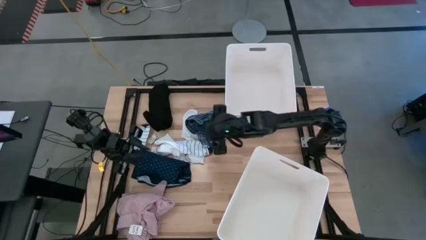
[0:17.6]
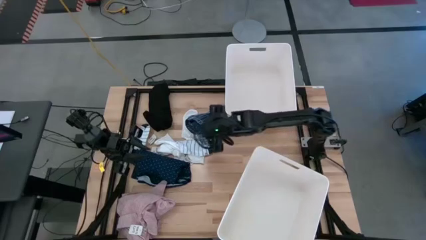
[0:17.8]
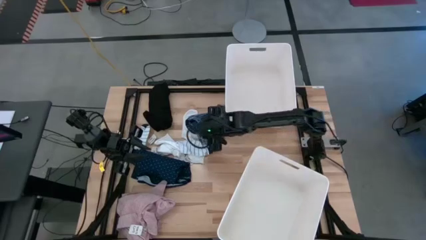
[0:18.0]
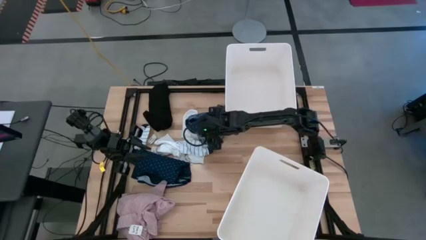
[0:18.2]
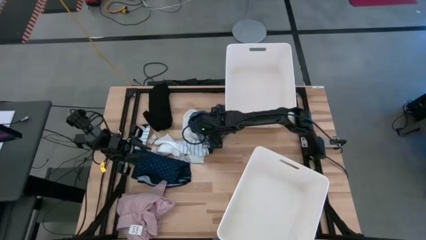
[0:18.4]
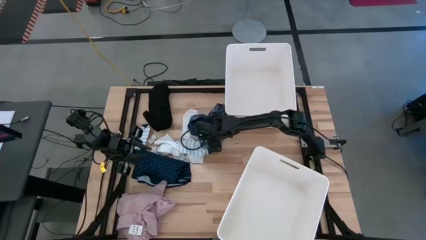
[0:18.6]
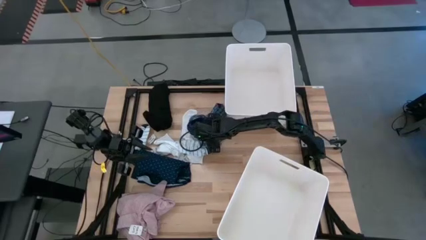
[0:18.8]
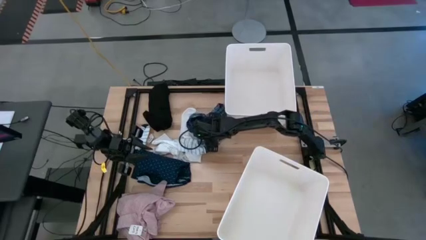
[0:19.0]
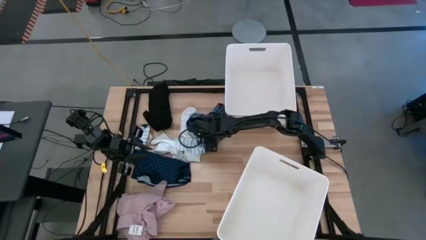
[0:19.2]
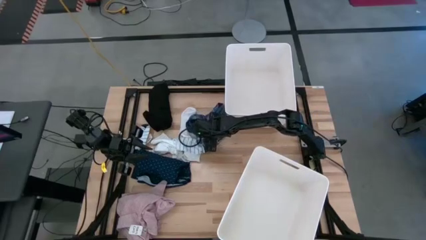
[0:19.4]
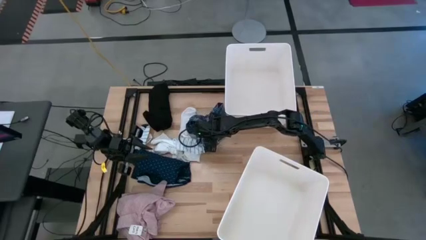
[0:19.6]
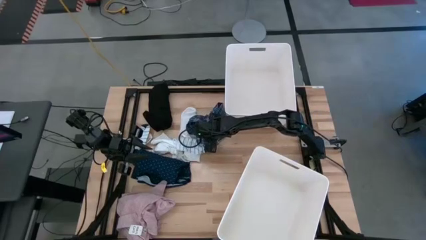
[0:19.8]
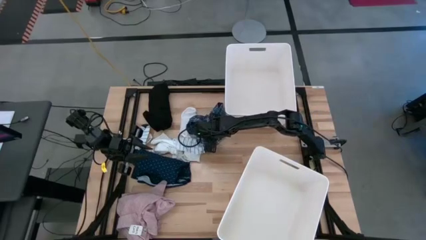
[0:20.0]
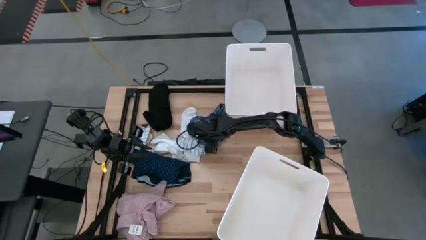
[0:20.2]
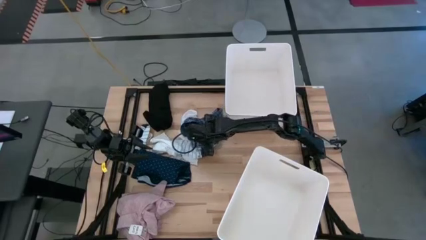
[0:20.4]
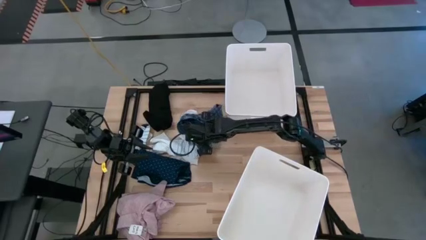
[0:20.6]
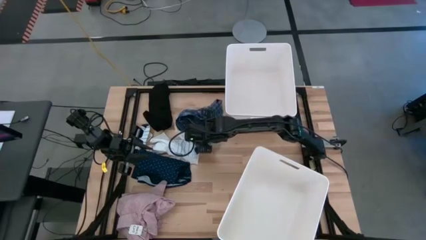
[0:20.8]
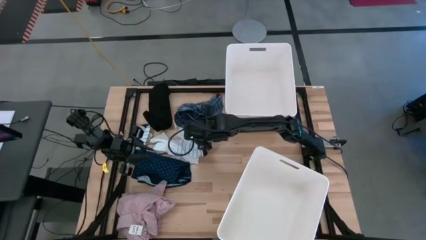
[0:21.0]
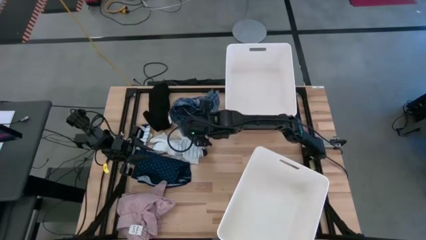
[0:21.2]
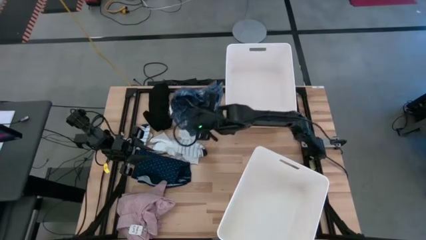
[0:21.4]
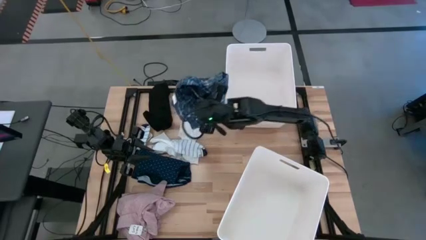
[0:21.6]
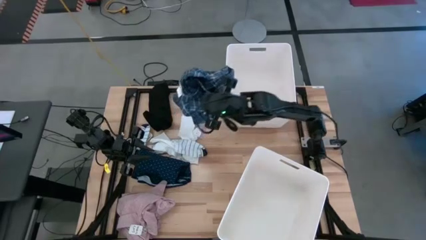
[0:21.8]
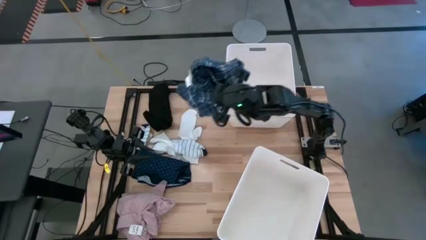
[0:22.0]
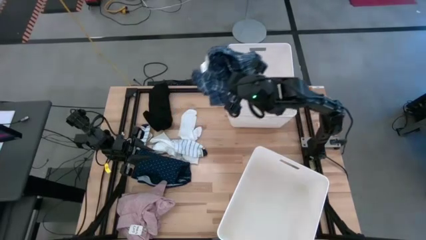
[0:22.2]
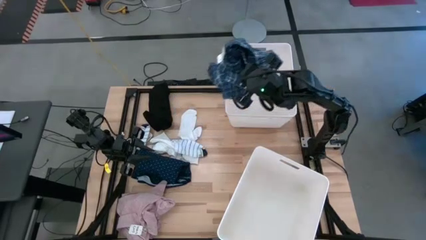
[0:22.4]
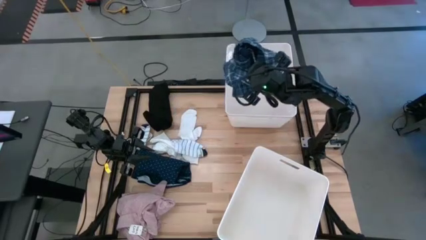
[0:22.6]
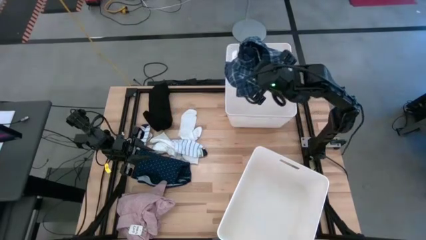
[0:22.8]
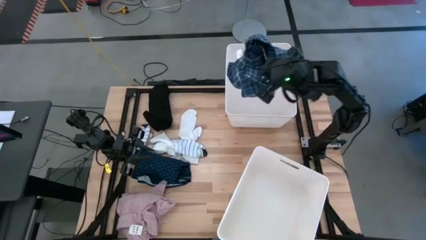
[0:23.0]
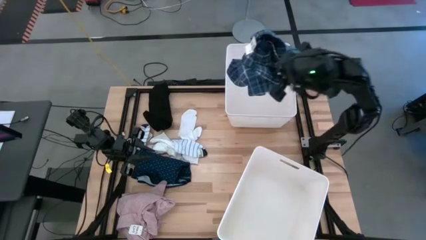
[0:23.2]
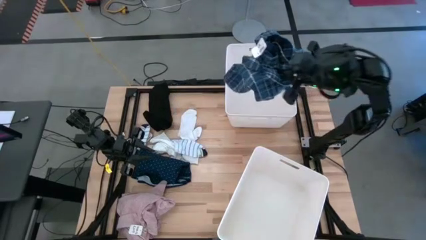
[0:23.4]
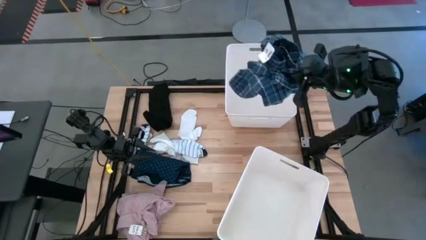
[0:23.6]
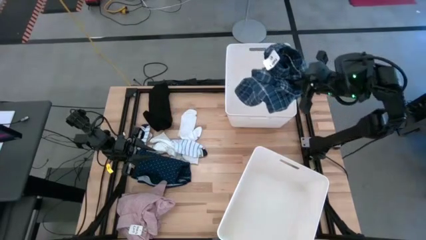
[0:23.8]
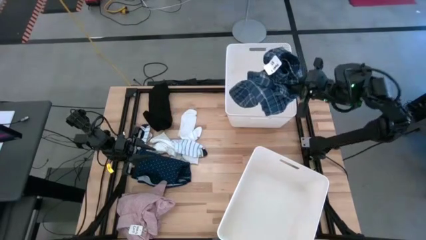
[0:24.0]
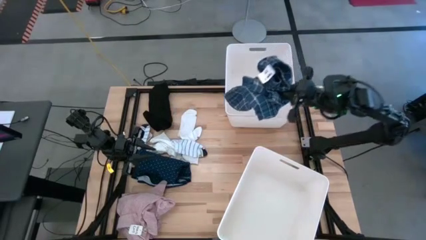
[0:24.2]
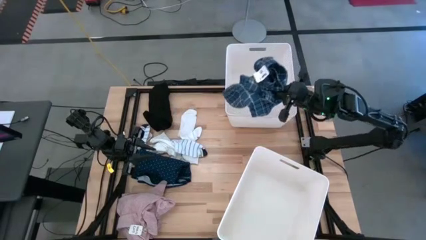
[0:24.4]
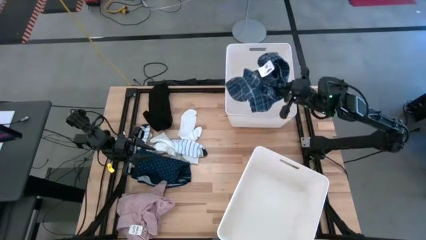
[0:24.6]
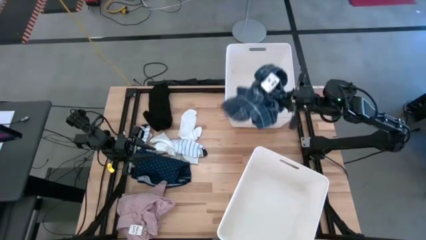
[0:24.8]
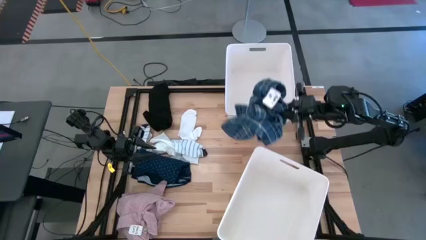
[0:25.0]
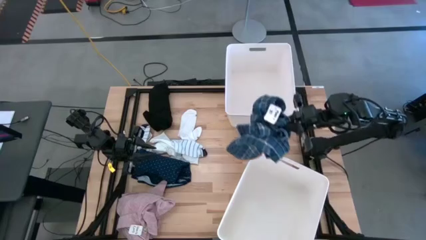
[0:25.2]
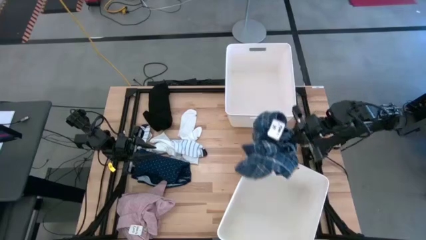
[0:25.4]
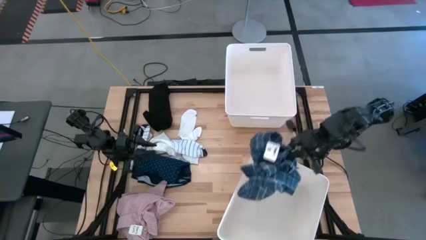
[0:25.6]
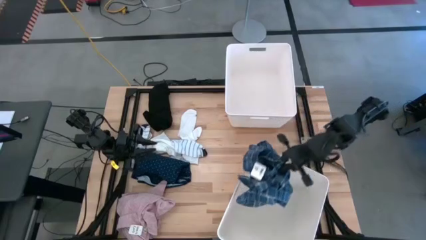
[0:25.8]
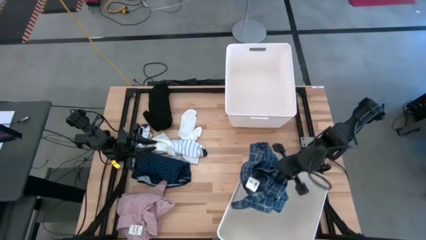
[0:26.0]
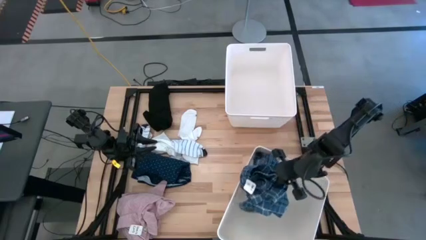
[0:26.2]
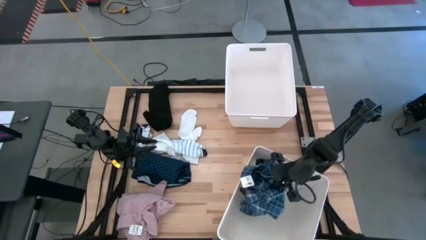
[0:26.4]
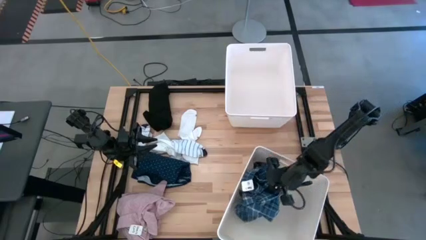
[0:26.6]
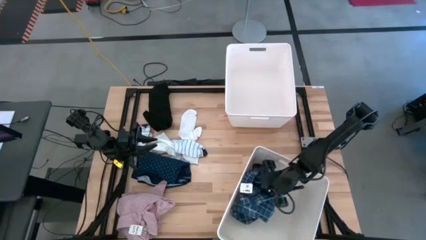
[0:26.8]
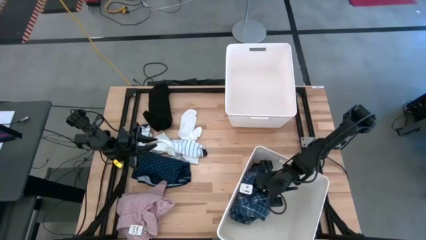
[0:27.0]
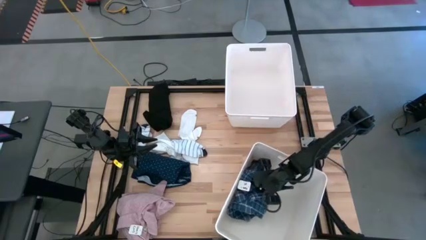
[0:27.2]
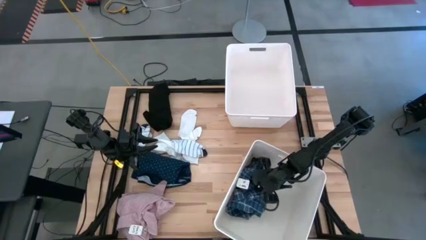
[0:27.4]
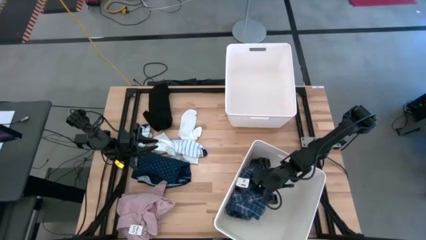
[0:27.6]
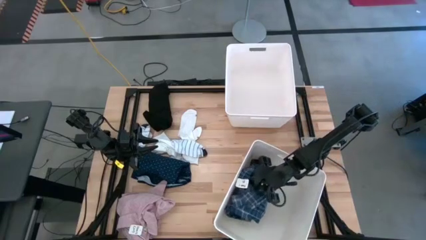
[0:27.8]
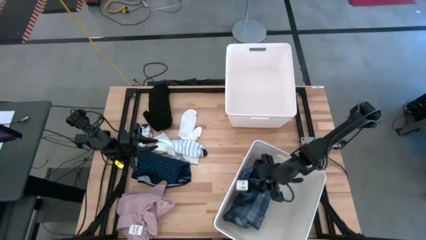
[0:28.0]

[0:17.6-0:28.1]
Task: Sort clothes
Put the blue checkered shorts into the bottom white laundry bin

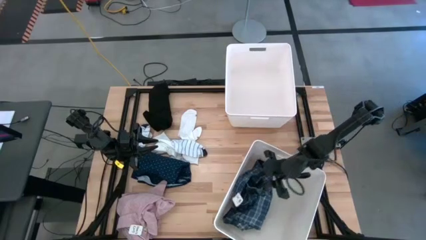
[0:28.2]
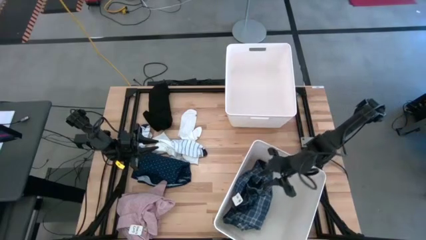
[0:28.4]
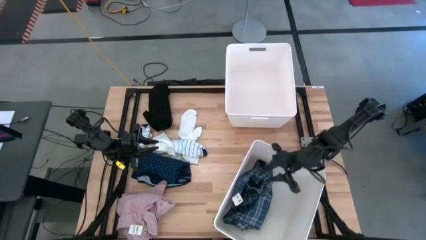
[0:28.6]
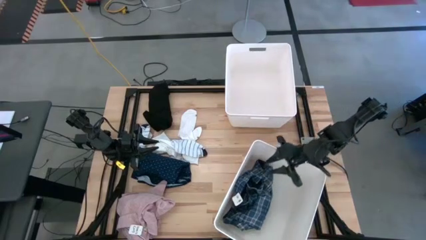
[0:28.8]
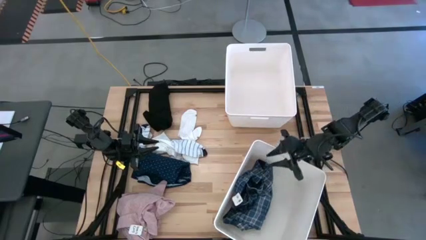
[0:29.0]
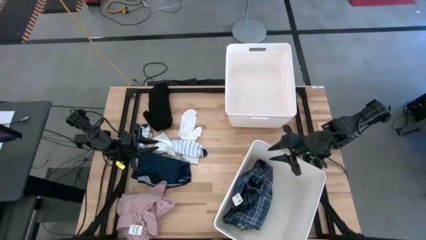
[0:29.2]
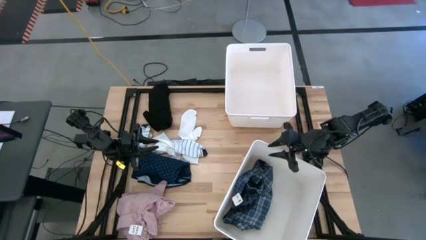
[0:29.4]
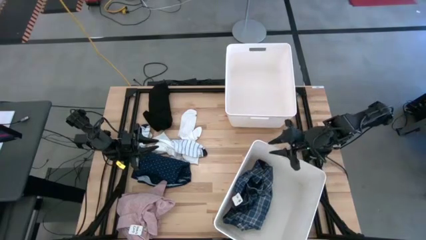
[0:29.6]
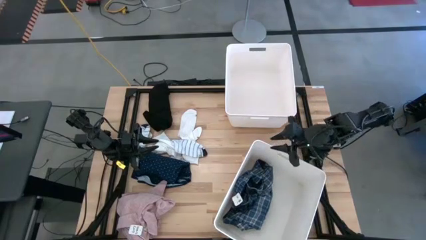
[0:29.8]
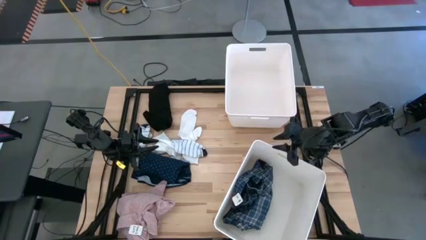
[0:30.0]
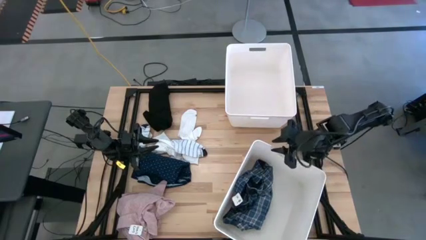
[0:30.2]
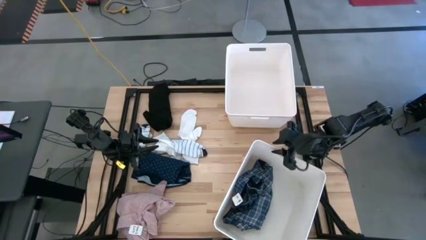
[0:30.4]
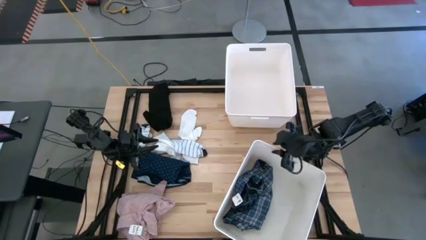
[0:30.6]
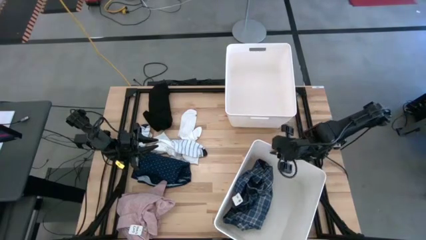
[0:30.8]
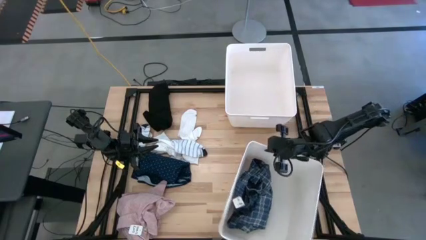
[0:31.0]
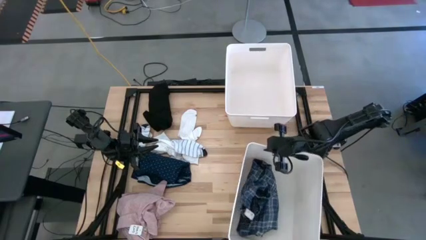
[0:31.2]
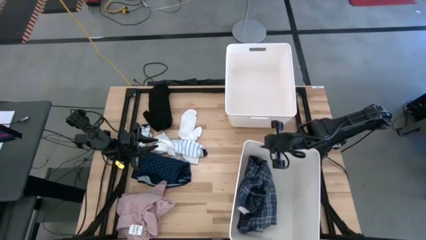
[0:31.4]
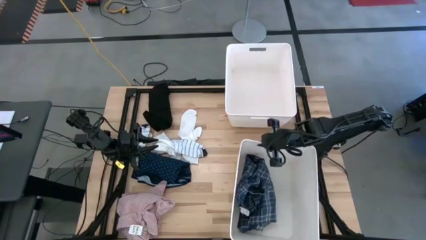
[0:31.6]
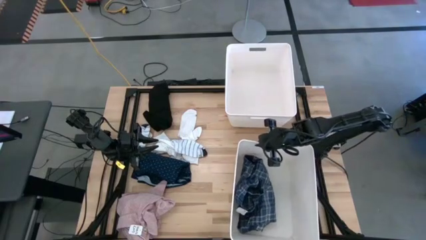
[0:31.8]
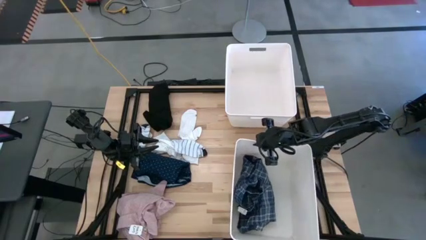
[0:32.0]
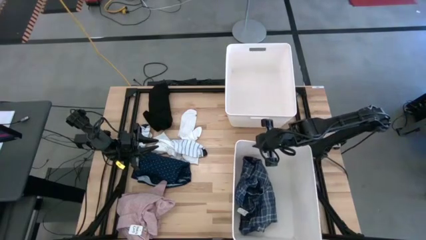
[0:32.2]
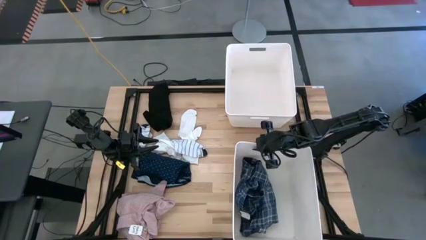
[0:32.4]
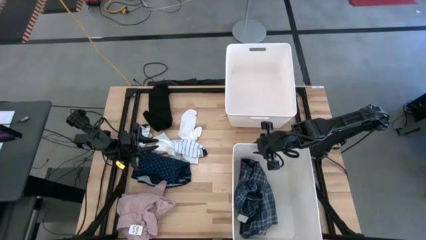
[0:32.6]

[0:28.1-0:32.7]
Adjust the bottom white laundry bin on the table
